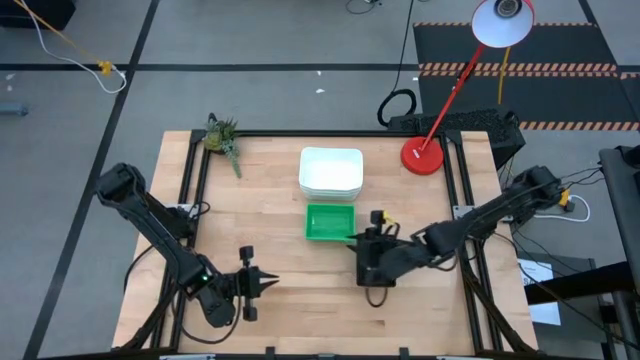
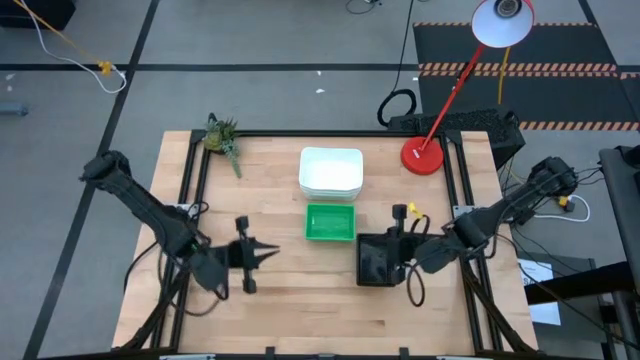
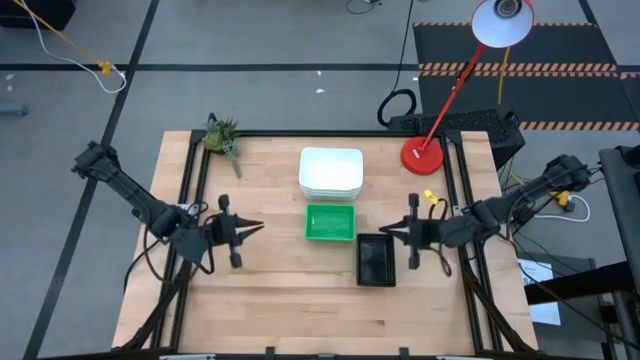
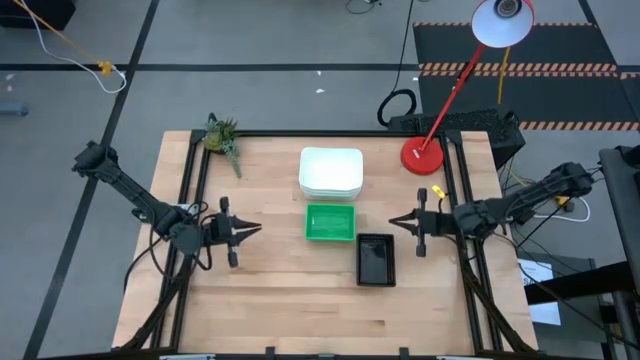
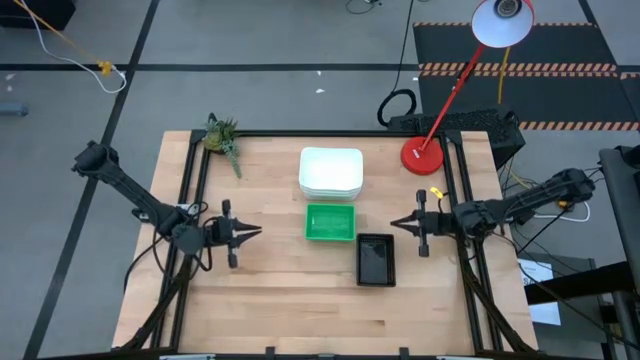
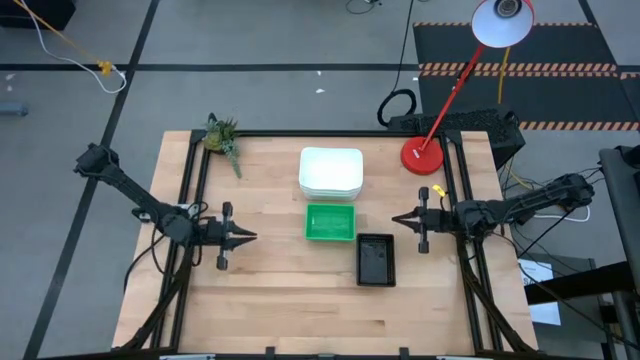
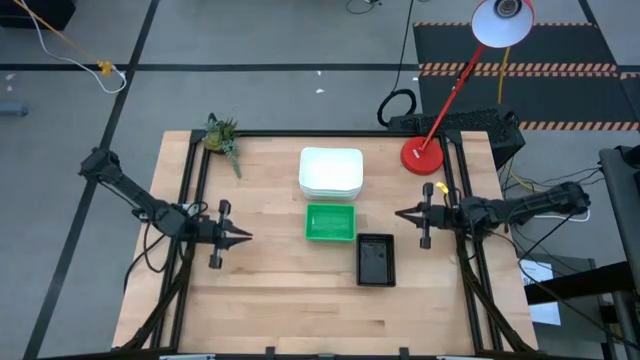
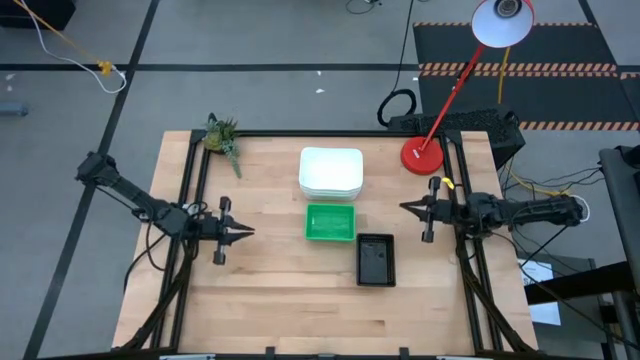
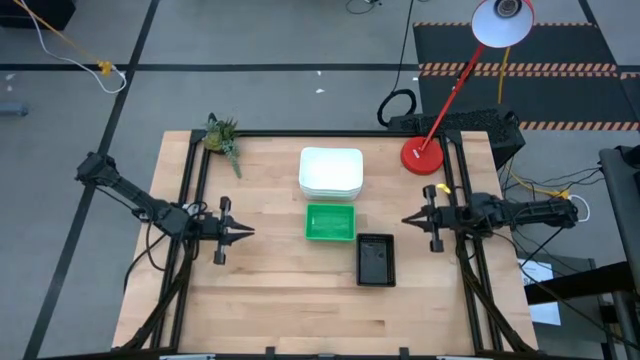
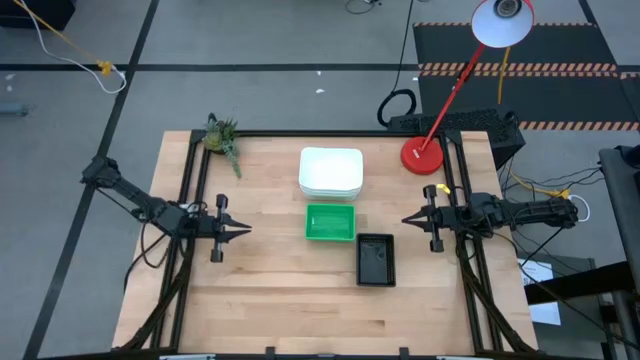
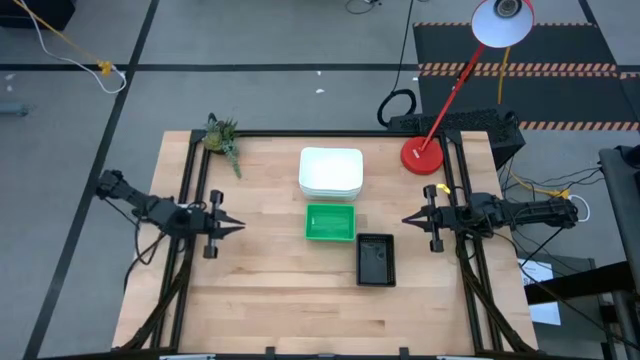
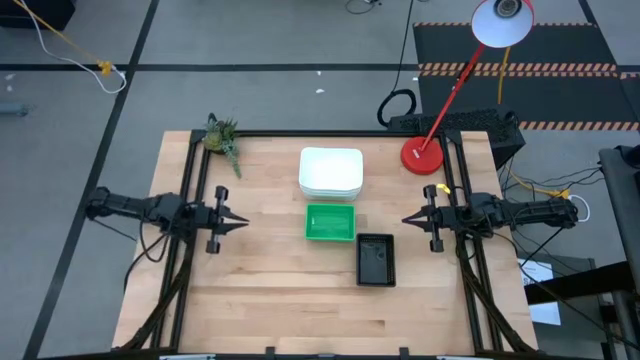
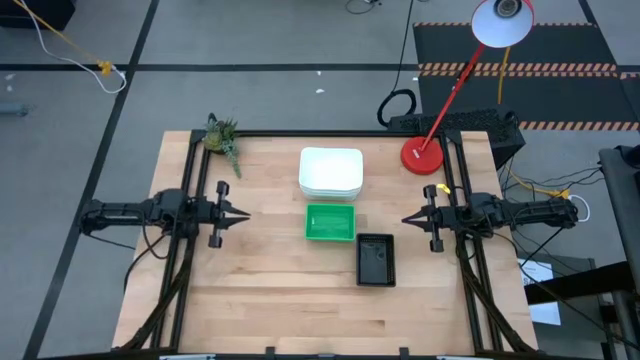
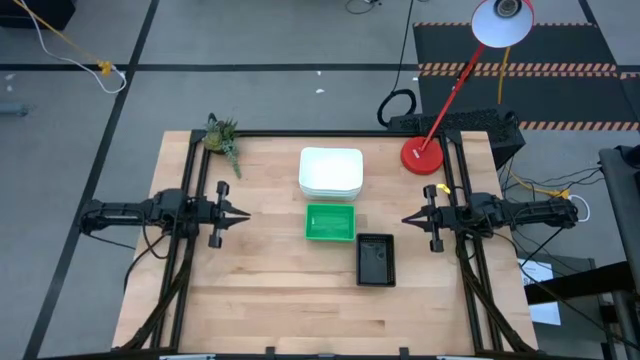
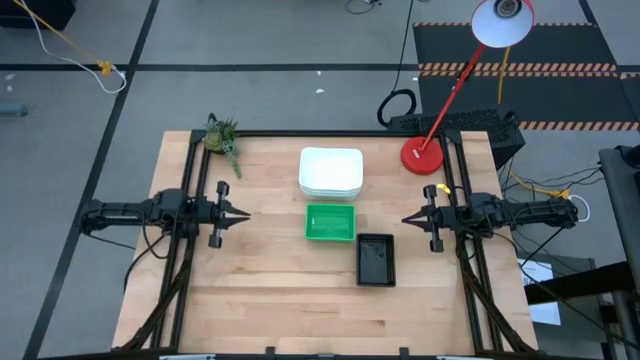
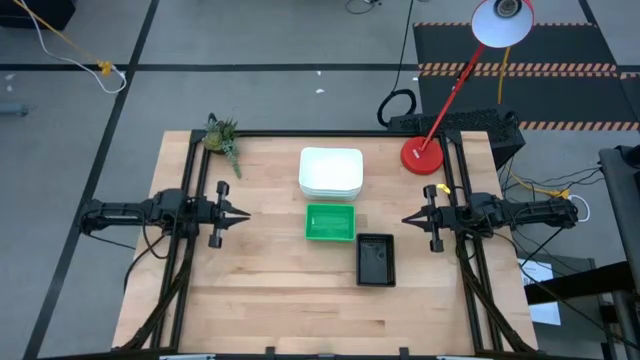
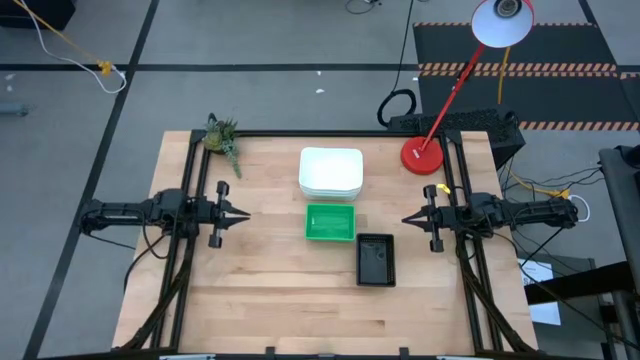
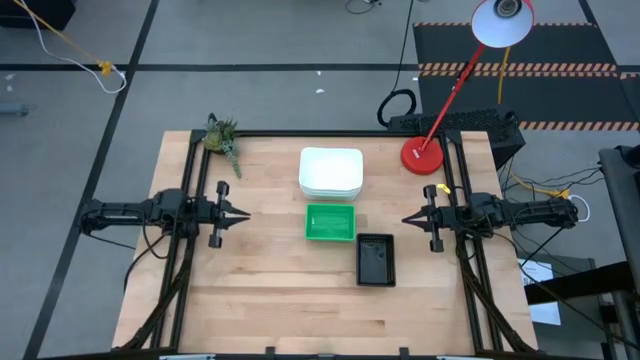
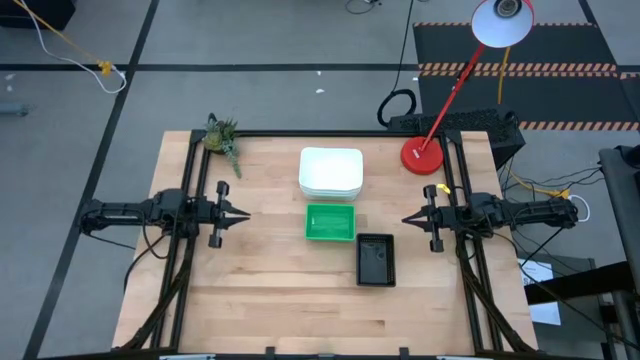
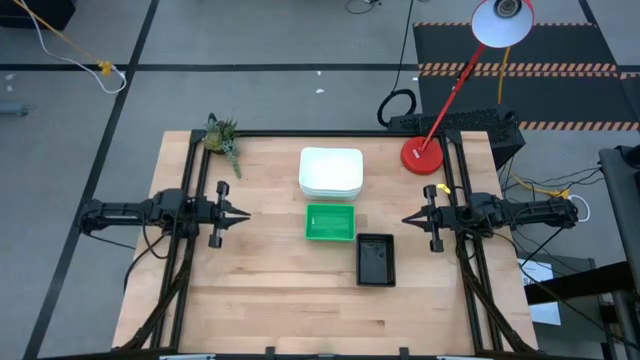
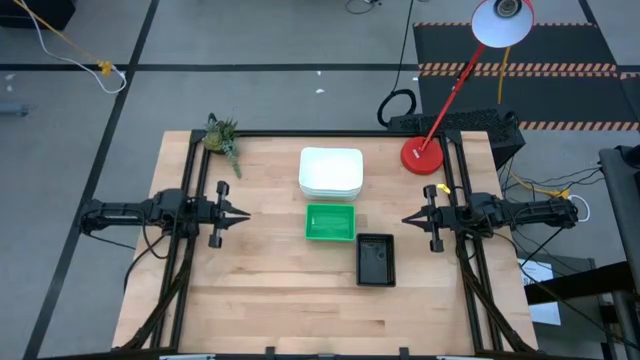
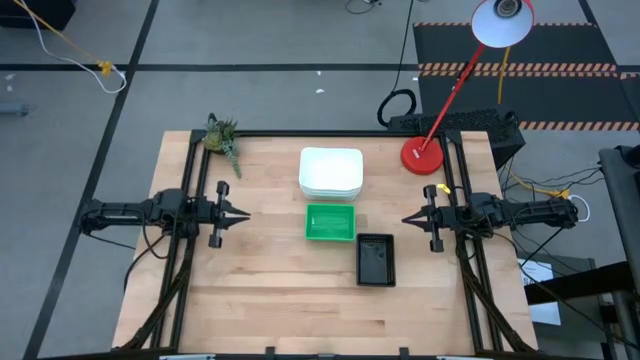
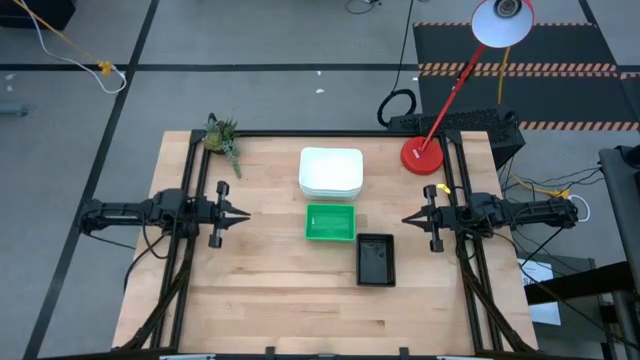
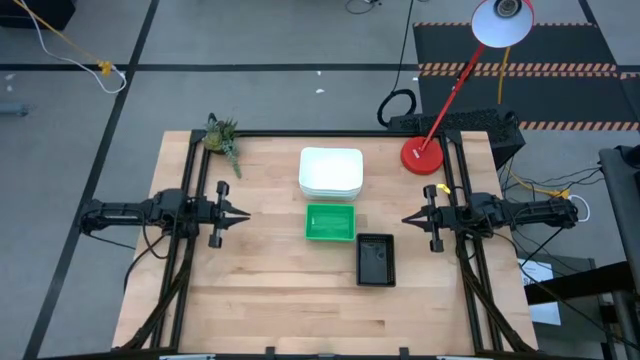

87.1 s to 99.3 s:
Return to Home Position
